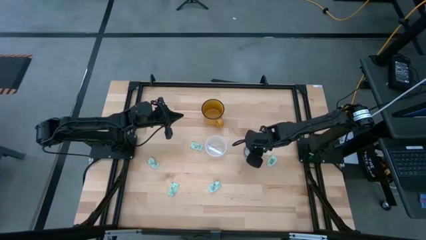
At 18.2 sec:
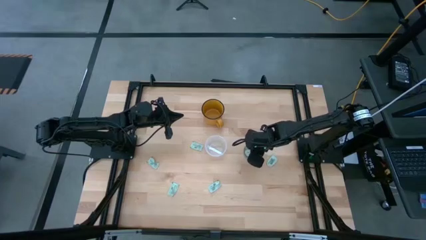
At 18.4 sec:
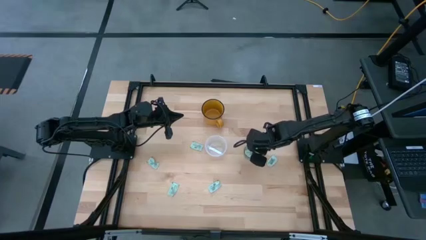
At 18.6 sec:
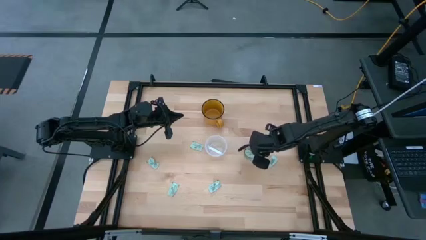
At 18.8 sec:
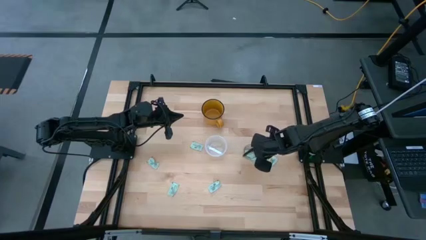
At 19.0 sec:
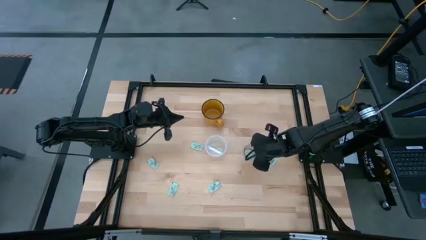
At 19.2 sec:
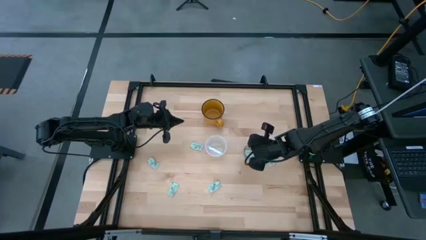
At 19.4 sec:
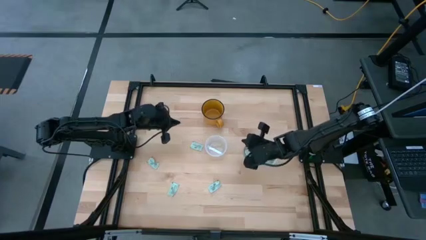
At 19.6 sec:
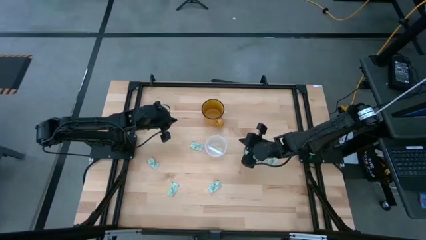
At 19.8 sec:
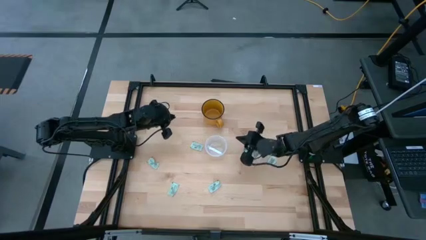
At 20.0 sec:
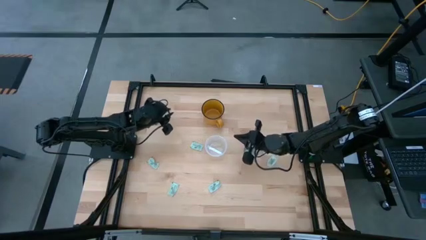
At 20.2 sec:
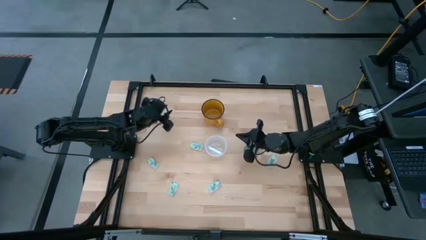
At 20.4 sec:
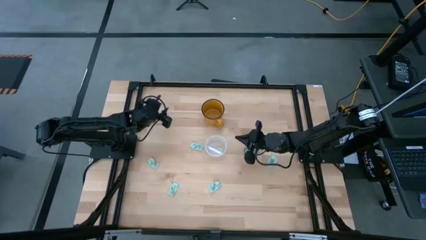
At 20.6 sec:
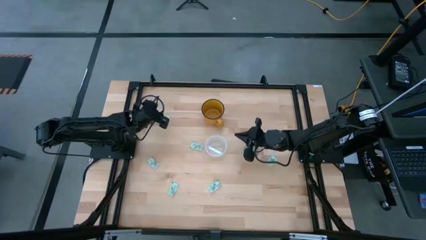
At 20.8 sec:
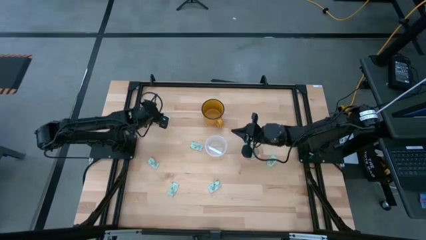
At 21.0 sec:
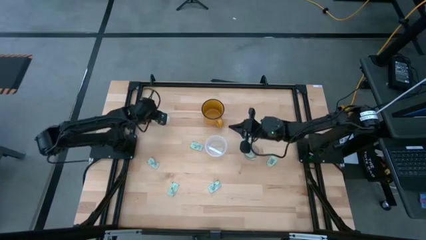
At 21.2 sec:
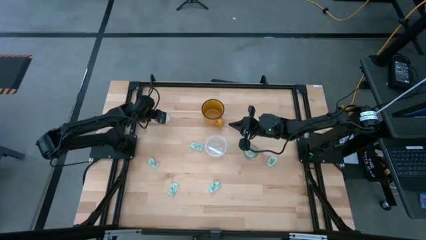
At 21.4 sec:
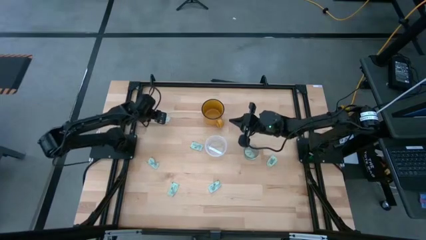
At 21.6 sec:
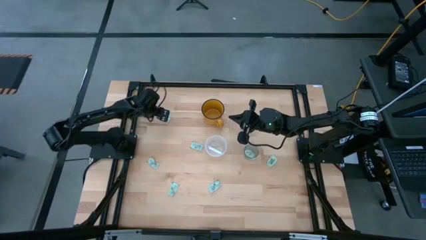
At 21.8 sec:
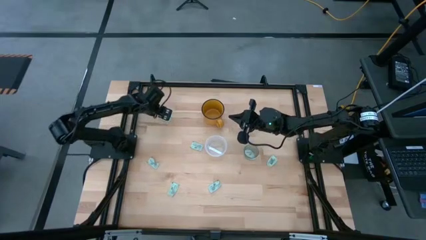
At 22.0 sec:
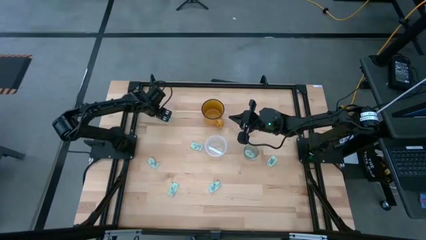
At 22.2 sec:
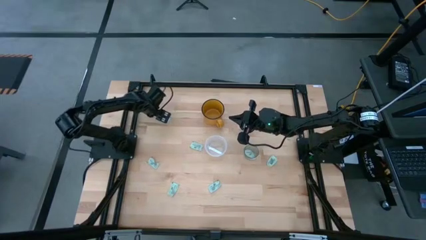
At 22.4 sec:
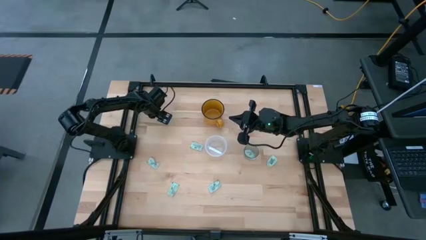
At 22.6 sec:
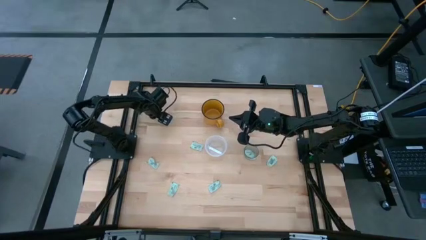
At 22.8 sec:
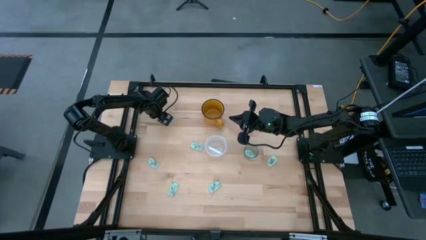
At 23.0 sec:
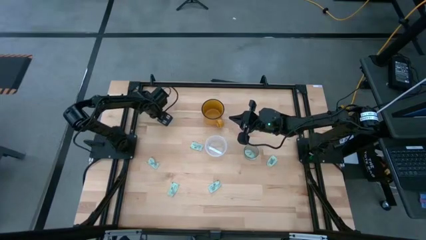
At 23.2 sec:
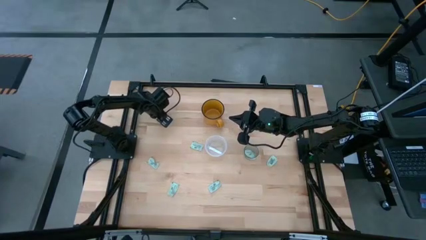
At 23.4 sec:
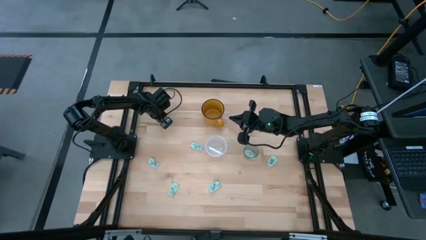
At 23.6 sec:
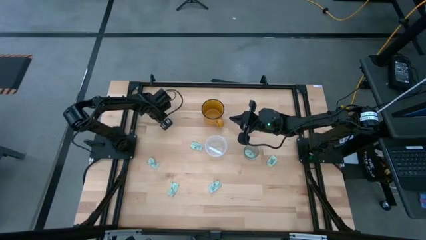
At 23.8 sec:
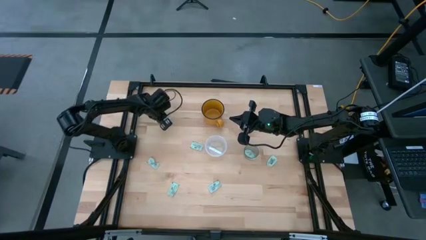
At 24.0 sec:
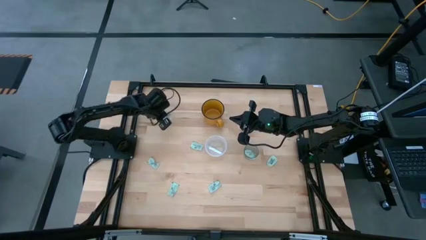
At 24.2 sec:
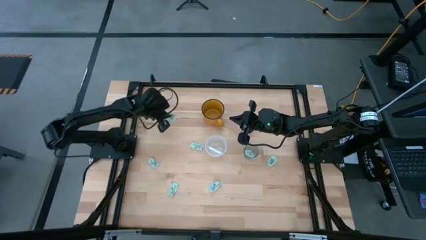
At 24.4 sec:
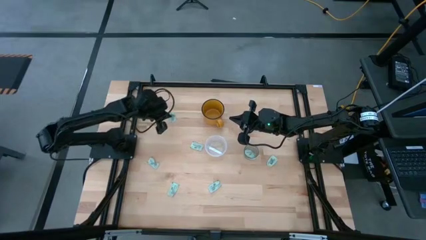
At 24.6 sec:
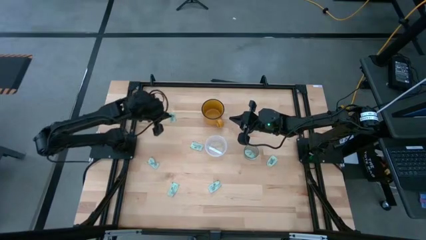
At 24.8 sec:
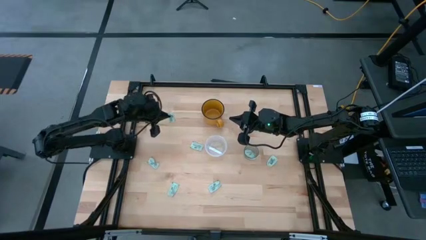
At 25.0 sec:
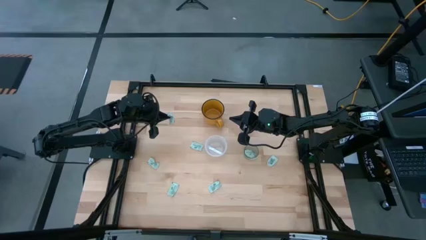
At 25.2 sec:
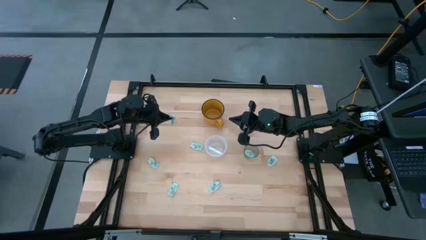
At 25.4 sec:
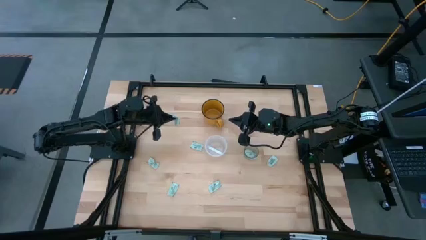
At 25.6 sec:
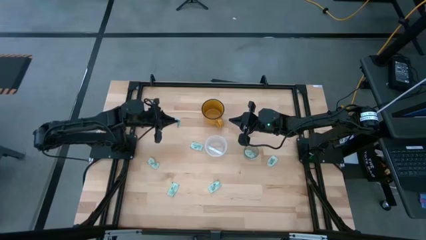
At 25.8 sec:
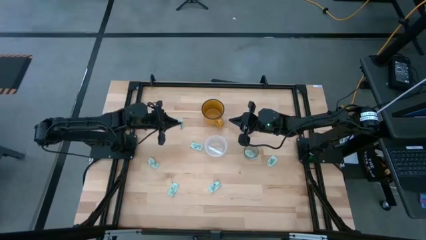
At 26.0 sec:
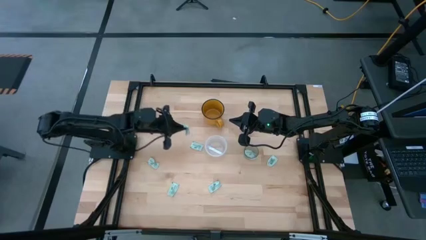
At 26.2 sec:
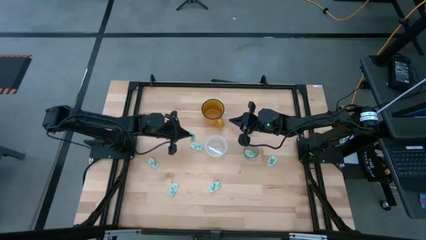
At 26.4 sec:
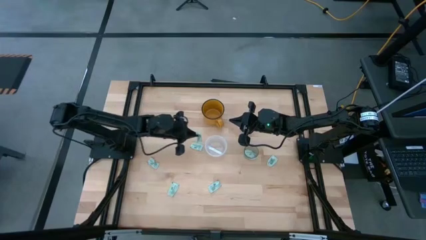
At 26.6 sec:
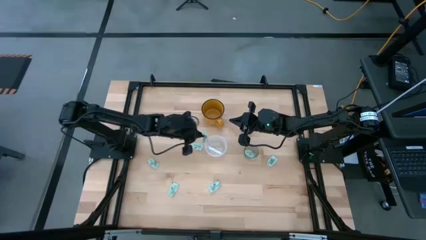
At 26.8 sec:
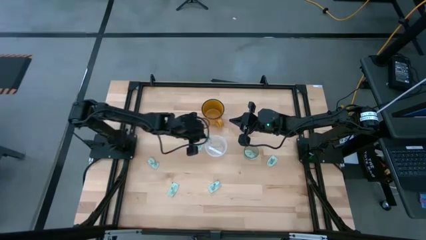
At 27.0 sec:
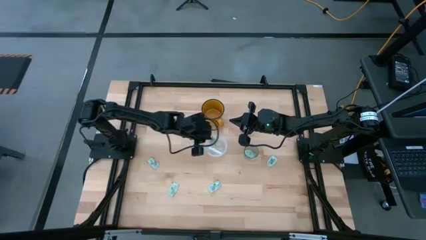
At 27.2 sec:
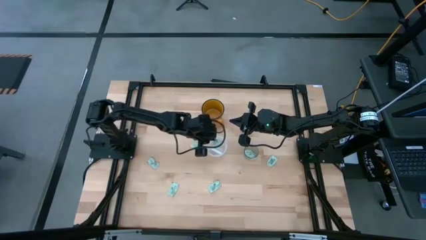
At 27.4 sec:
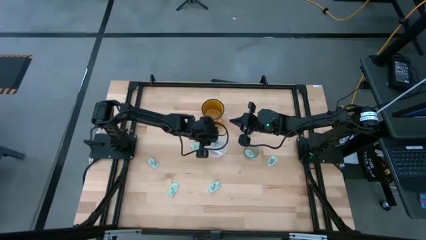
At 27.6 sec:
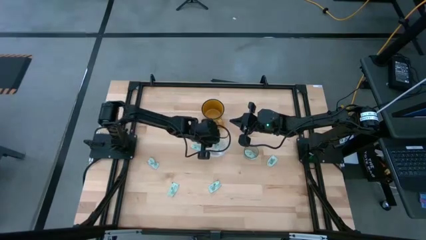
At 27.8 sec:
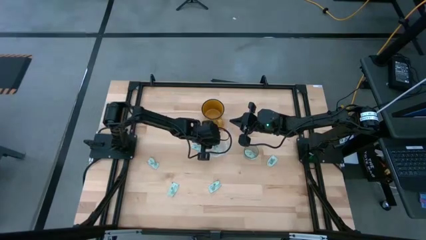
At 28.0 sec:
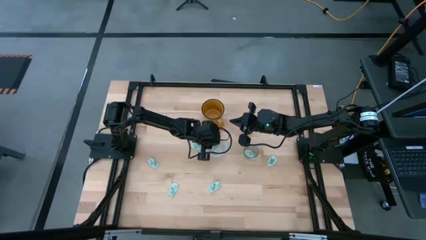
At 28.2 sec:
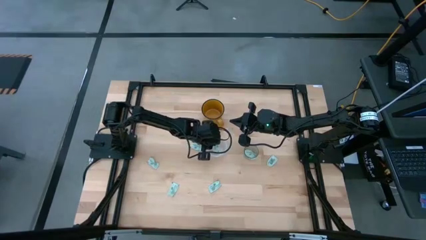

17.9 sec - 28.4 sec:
Task: Pick and place Stevia / Truvia into bins
Put the green stevia packet into the transparent container

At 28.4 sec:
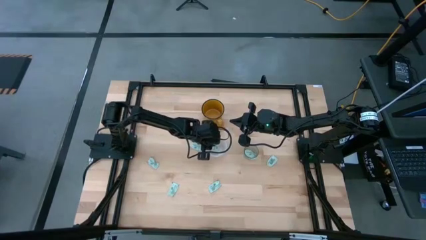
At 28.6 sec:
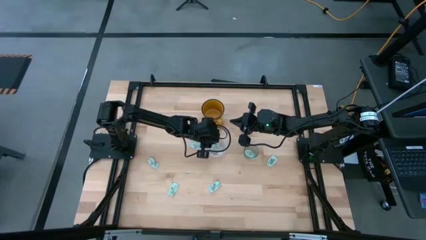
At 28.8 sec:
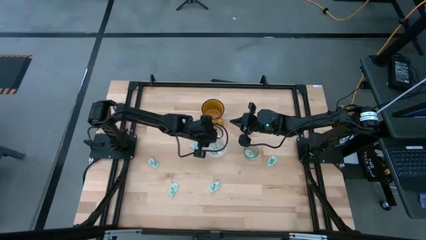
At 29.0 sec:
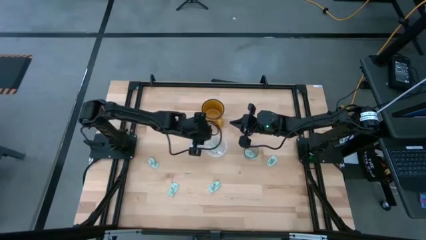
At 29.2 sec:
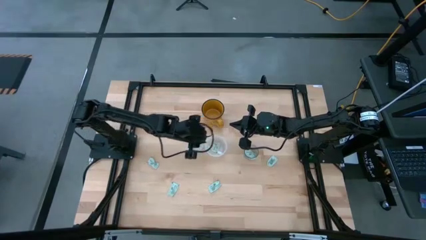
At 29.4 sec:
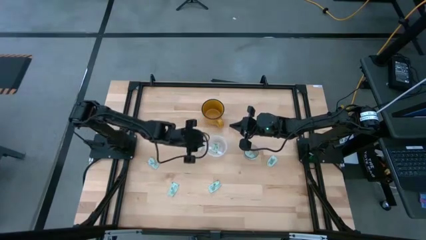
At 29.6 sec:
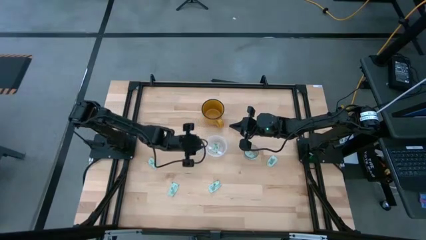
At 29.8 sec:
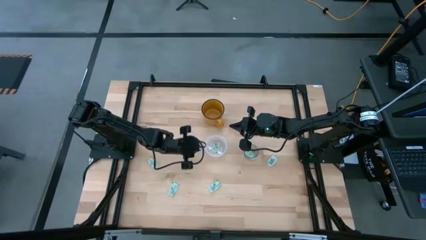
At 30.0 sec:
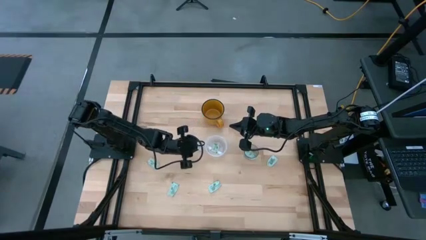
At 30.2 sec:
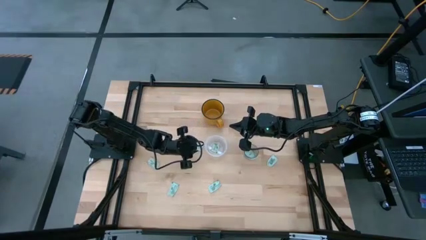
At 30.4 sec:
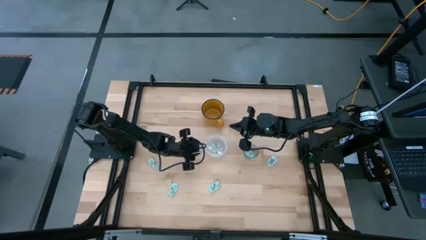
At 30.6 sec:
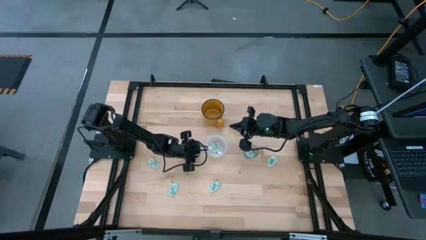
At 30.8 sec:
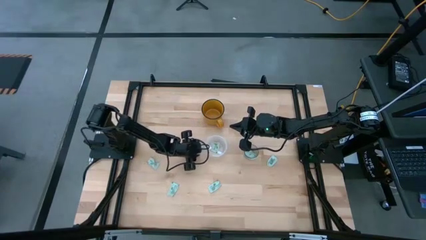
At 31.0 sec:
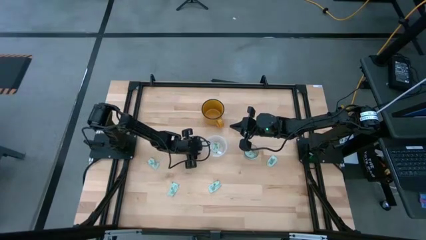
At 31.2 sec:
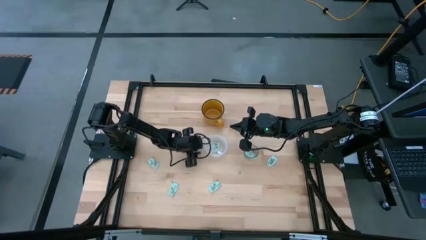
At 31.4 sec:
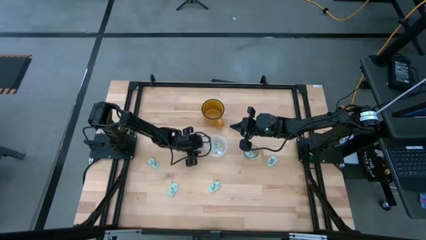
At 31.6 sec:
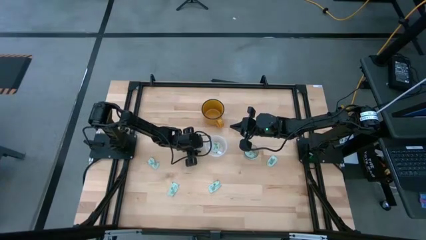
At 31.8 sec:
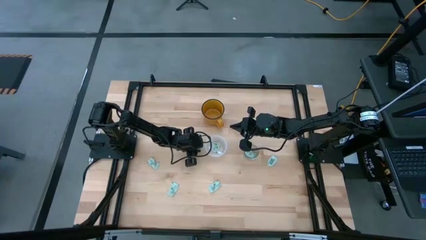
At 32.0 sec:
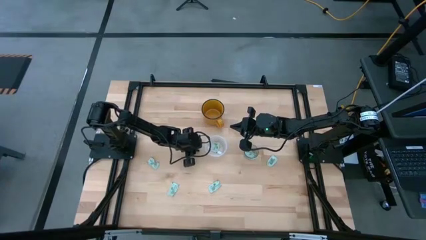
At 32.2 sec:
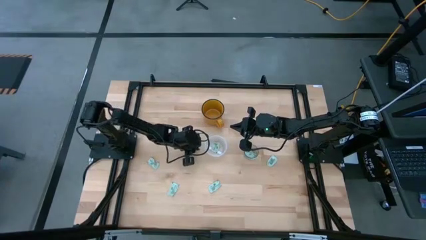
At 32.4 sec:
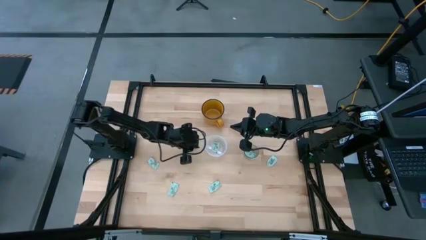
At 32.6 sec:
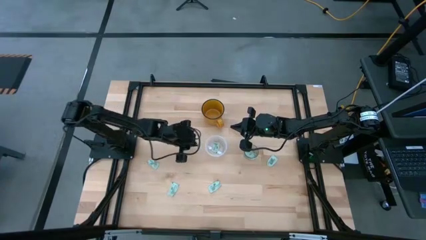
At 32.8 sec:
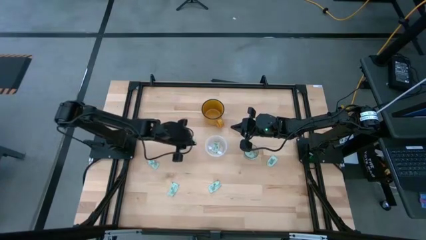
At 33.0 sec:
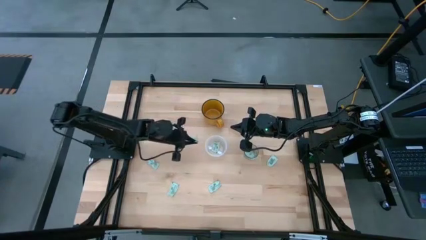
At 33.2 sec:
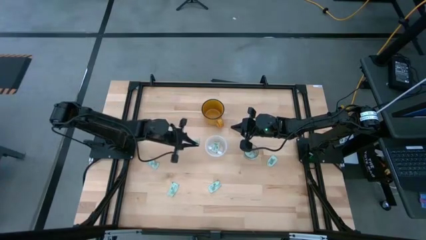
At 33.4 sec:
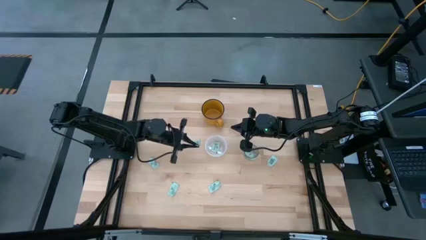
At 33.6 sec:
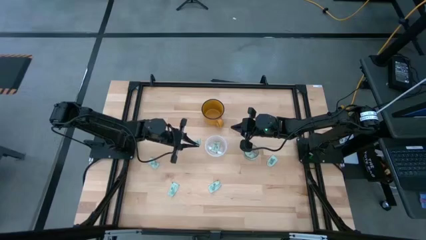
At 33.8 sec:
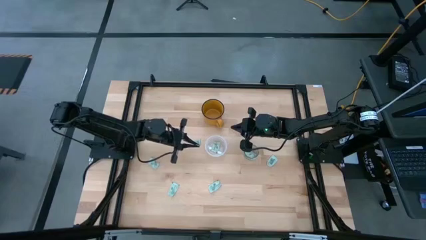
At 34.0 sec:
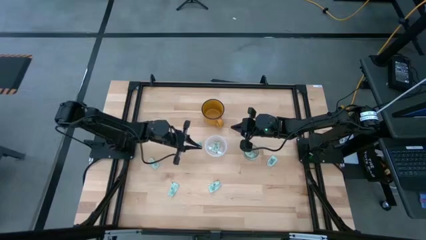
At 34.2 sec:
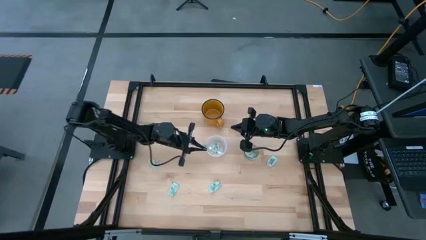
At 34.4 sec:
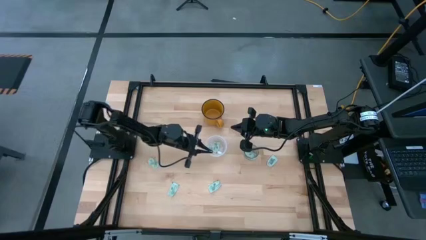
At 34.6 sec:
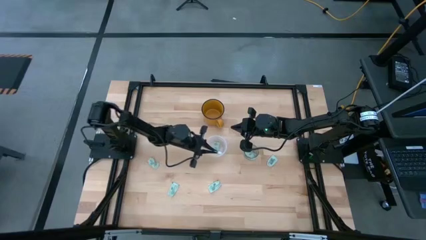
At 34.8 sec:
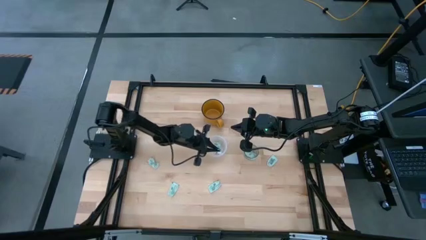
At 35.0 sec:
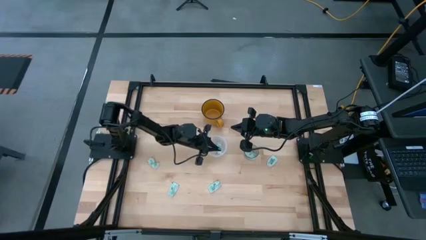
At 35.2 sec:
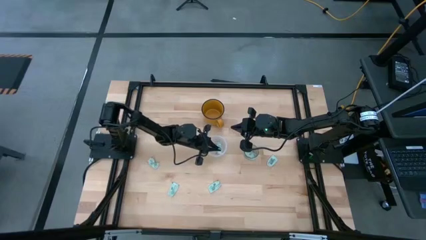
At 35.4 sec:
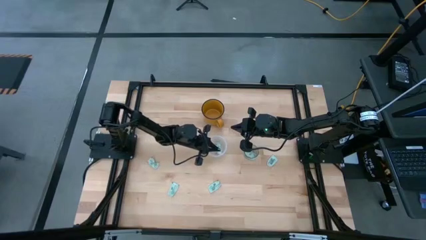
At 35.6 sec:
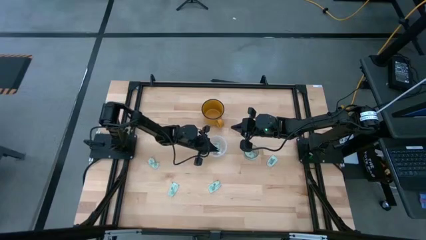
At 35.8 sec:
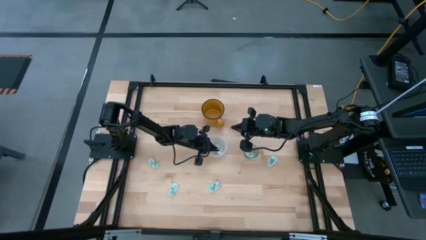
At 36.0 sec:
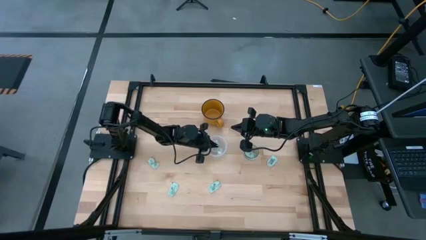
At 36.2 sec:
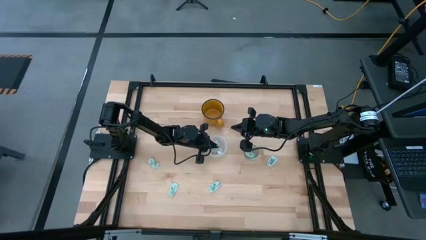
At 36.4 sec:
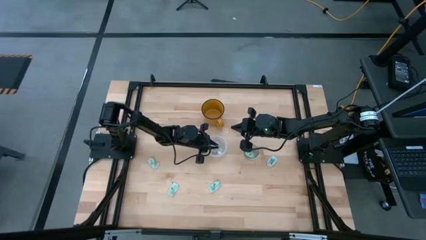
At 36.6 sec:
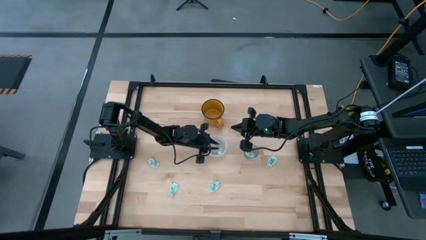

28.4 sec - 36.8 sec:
Put the green stevia packet into the transparent container
